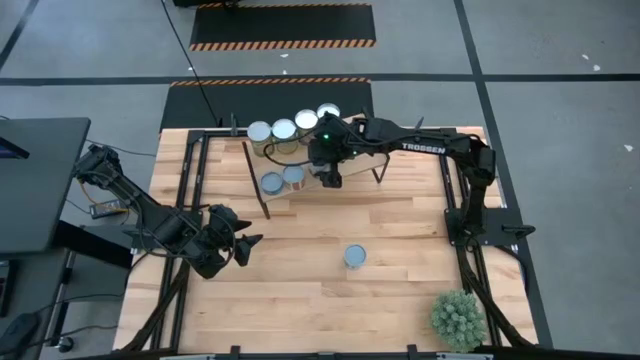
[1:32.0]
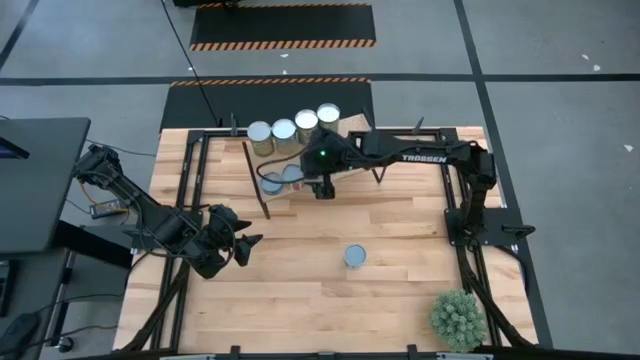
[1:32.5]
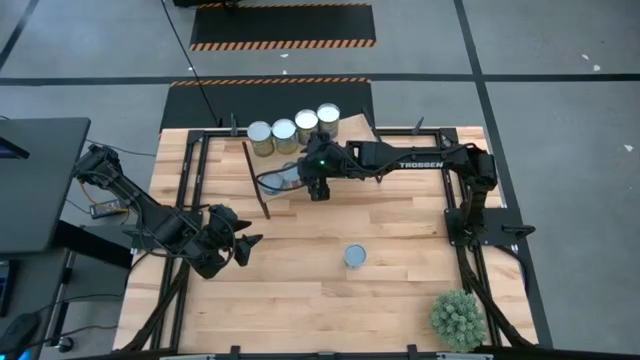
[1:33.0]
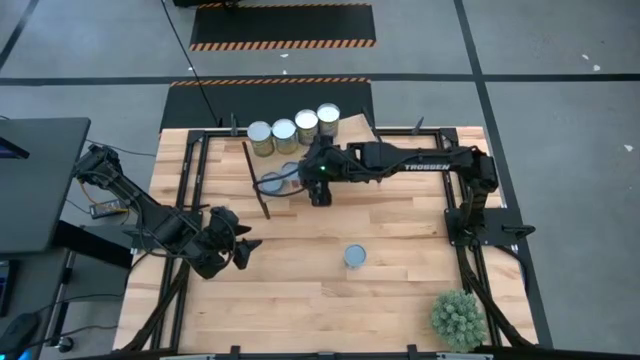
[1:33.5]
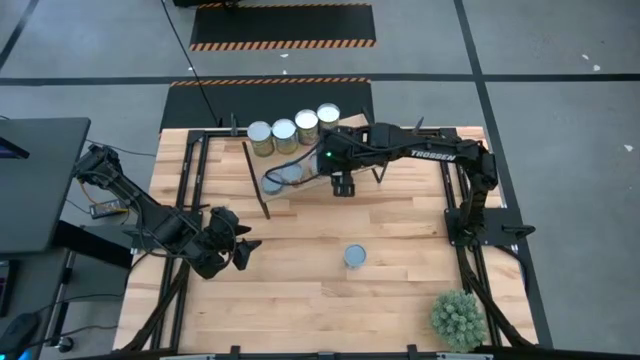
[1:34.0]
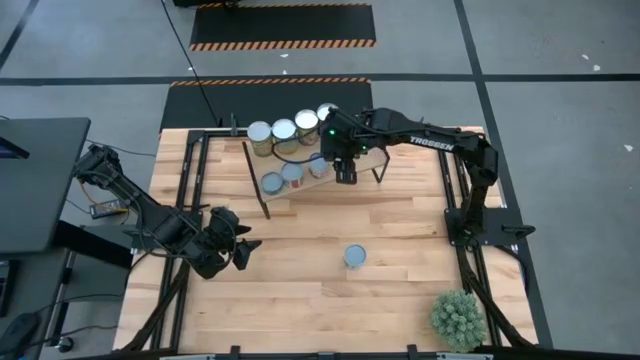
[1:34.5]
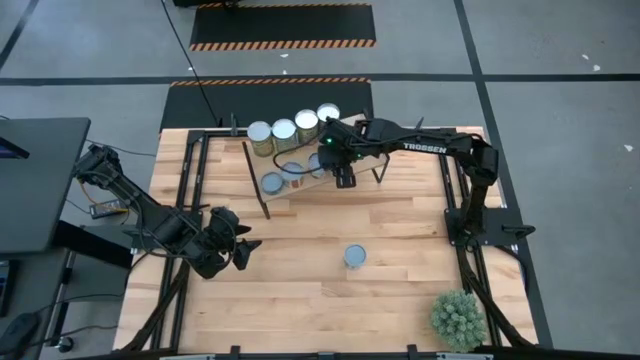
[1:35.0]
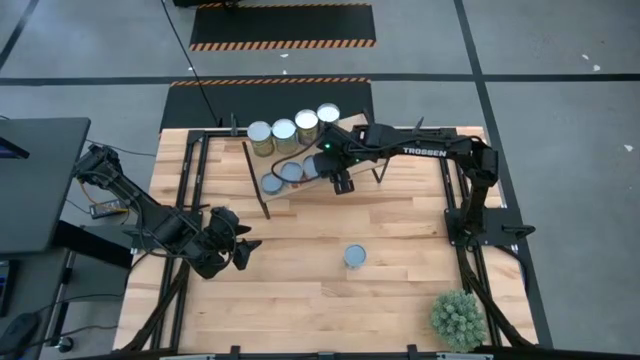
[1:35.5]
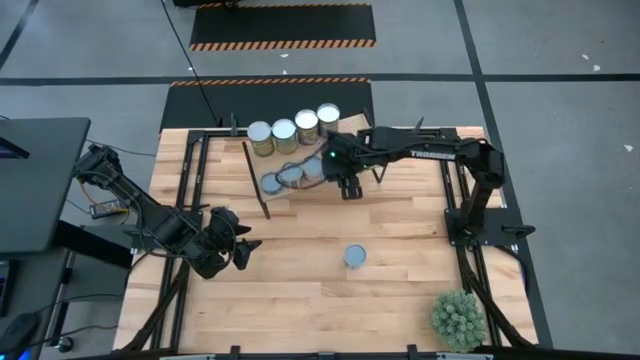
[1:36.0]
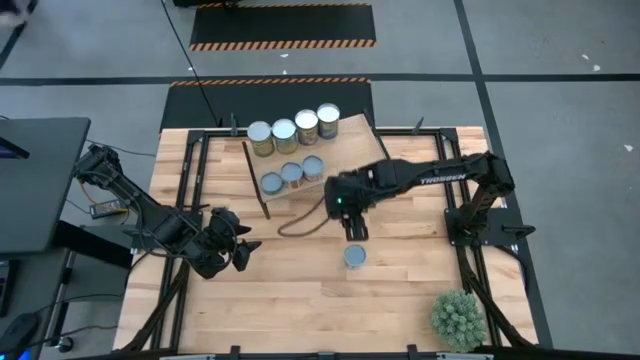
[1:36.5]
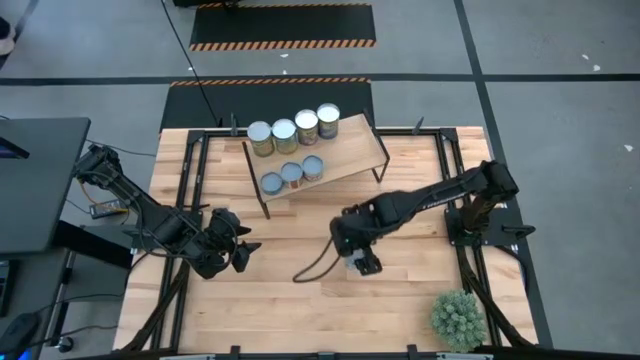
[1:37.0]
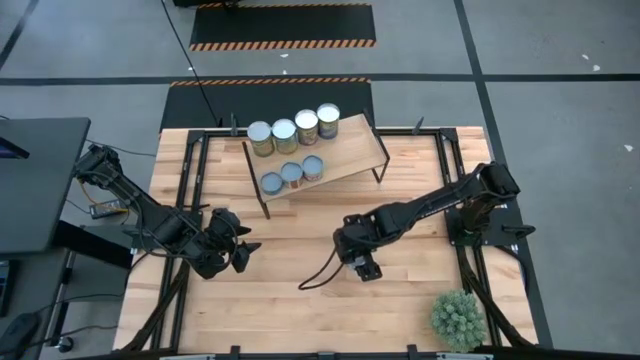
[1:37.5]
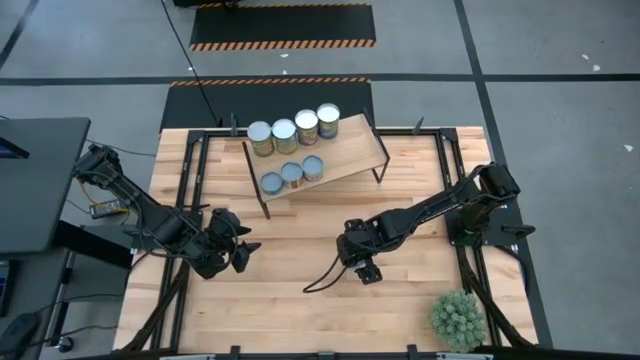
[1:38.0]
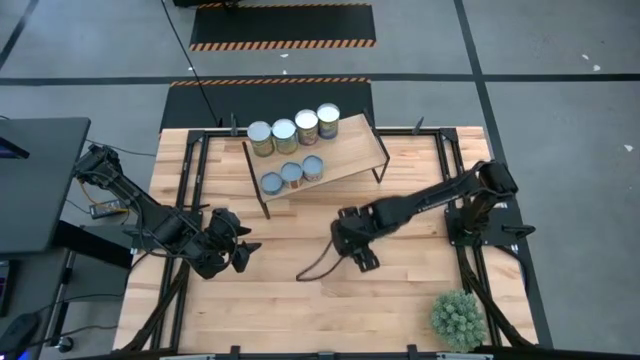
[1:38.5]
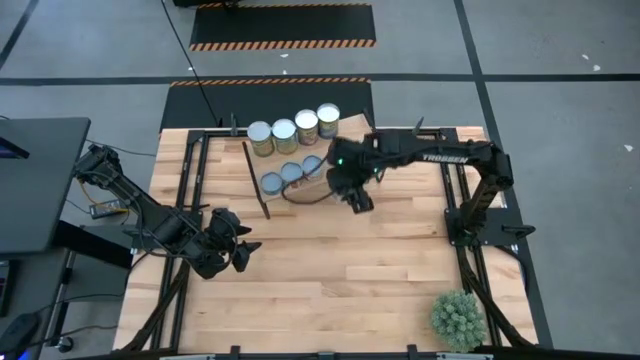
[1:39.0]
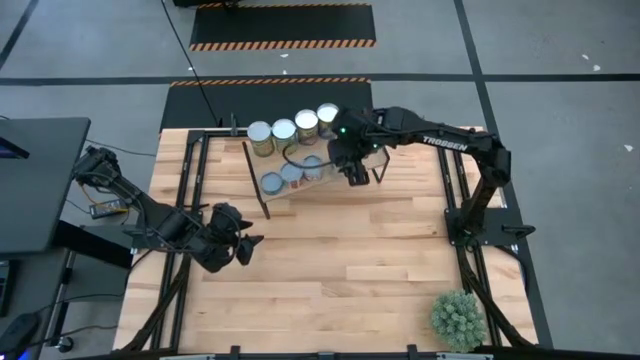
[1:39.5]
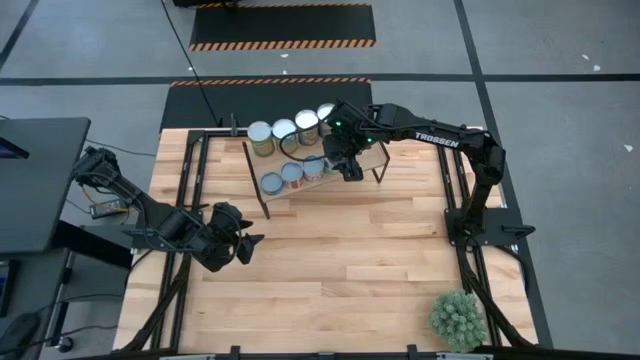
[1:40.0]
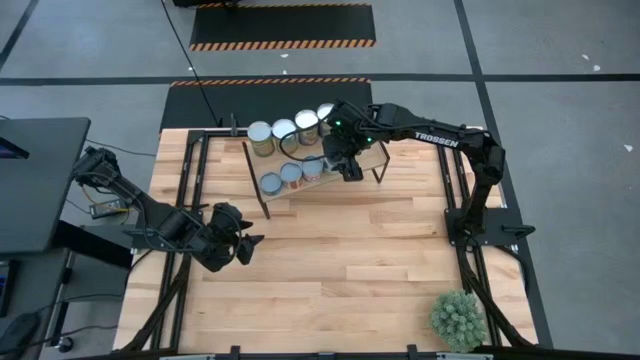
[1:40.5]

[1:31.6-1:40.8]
Task: Pick and place cans onto a shelf
Put the mixed vegetables can on the shelf

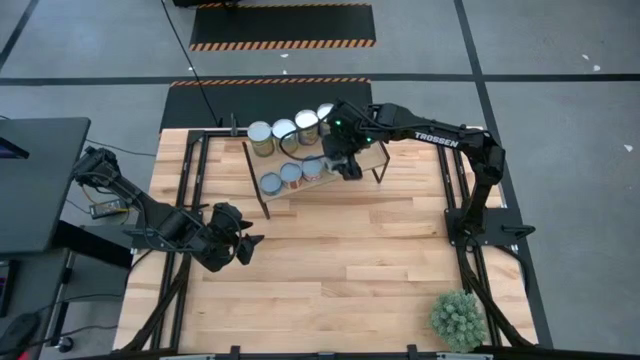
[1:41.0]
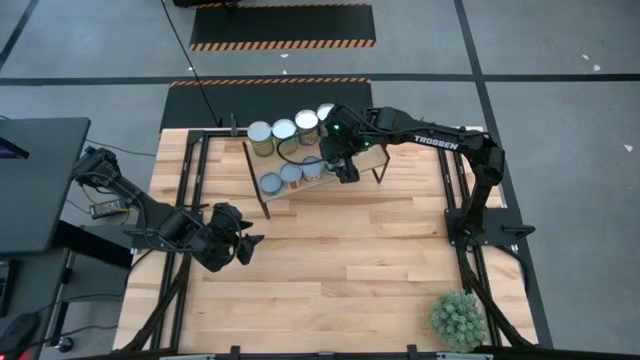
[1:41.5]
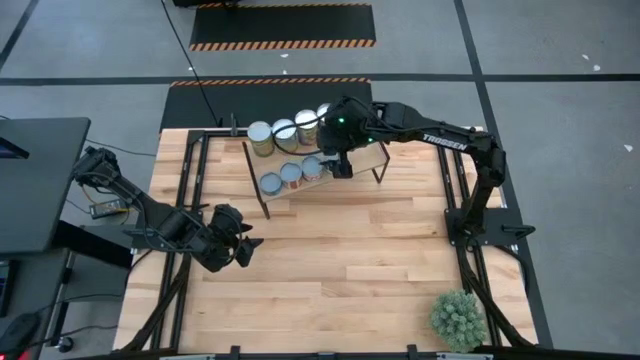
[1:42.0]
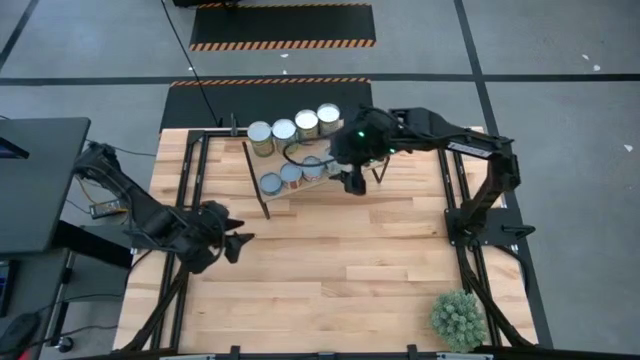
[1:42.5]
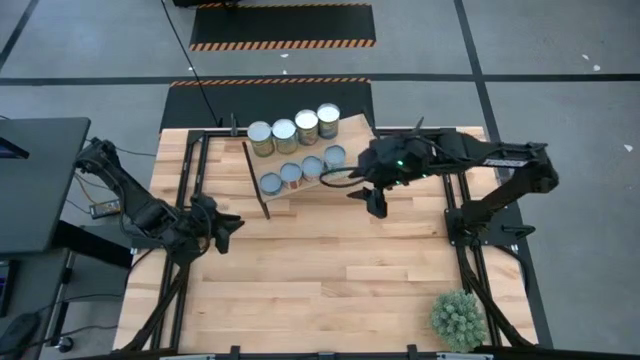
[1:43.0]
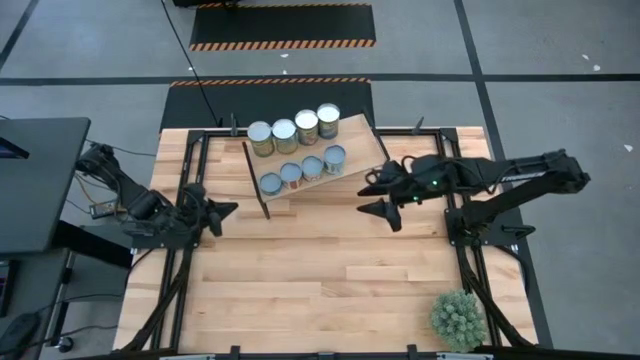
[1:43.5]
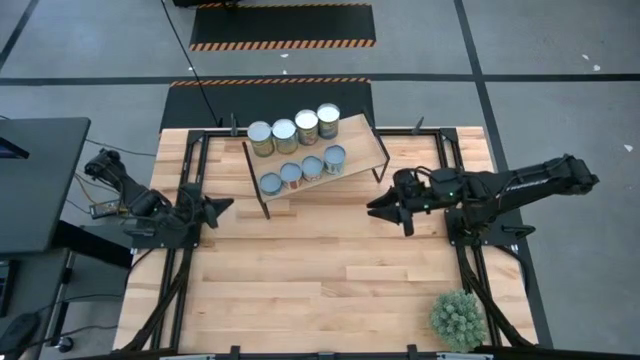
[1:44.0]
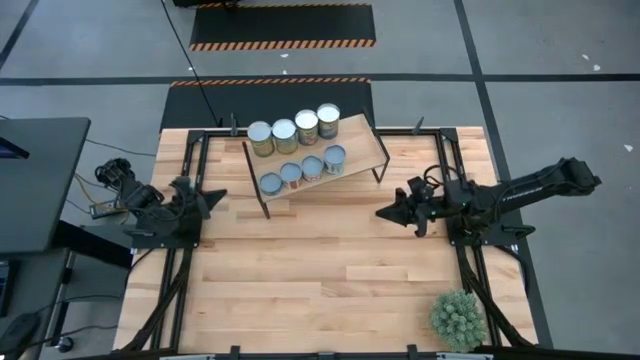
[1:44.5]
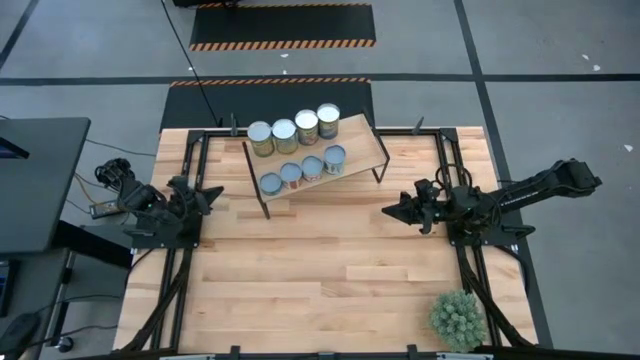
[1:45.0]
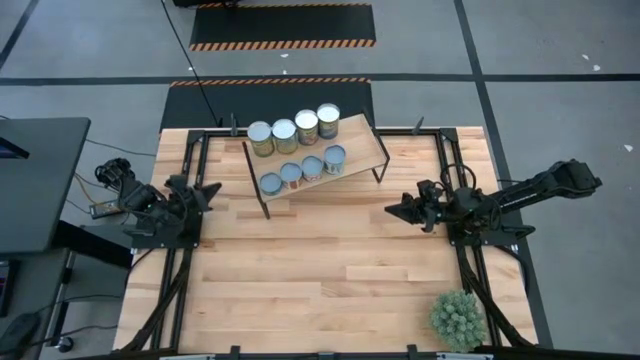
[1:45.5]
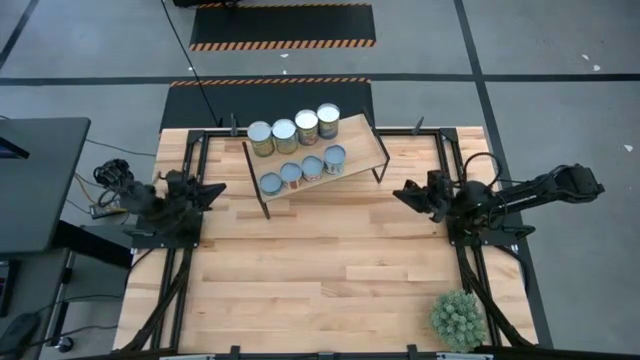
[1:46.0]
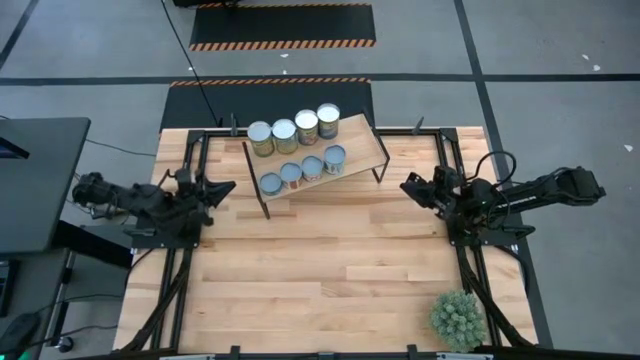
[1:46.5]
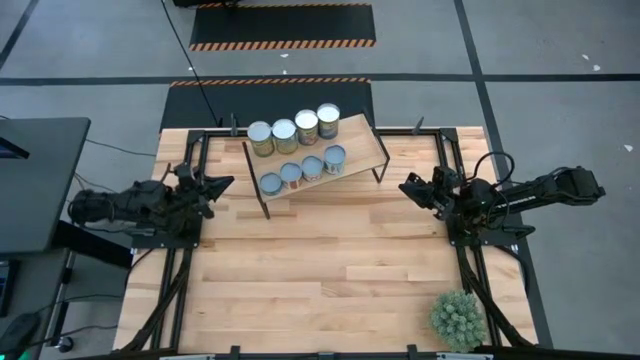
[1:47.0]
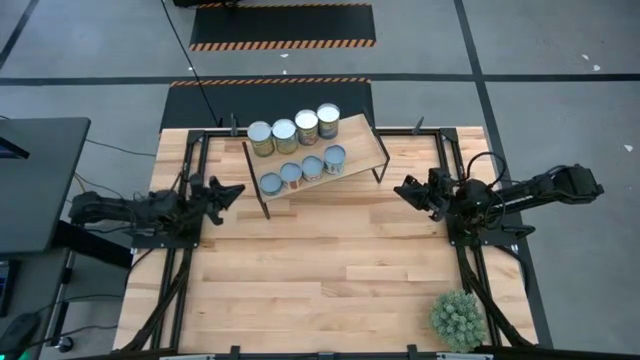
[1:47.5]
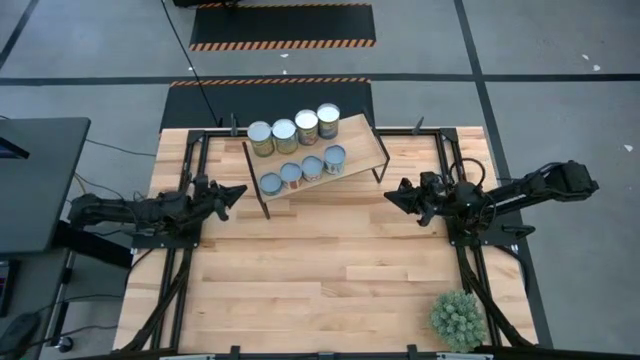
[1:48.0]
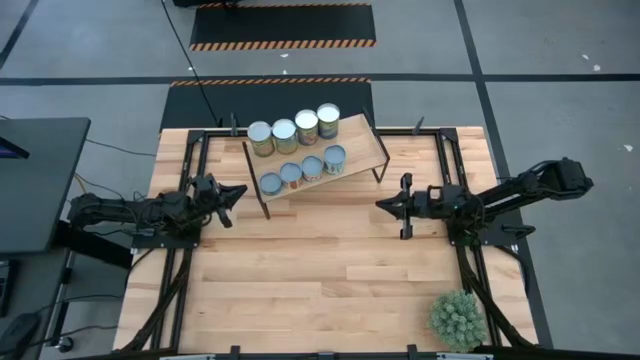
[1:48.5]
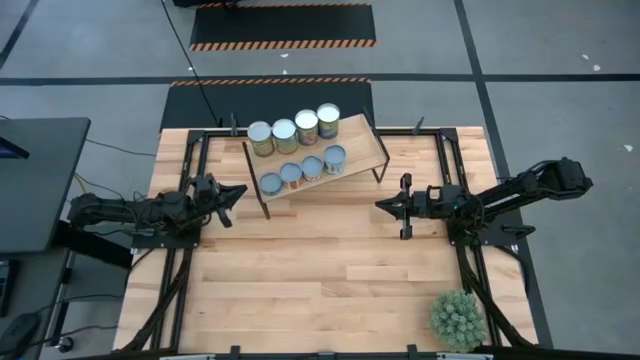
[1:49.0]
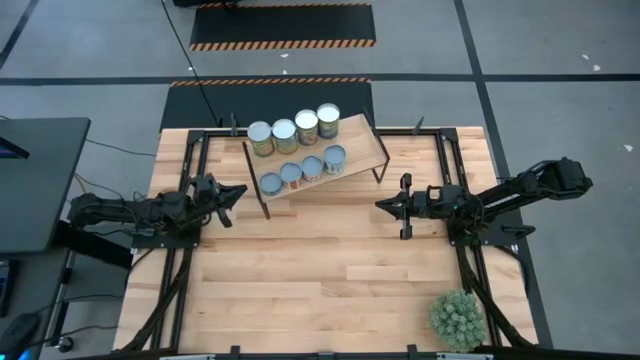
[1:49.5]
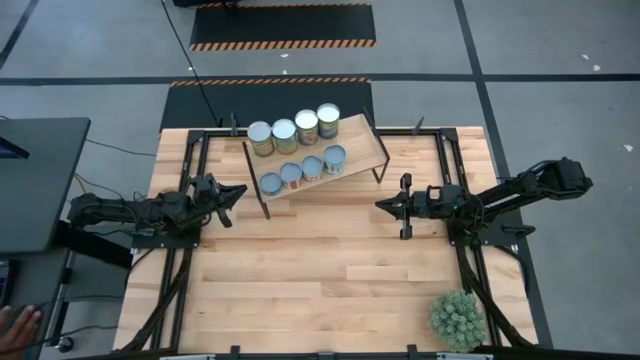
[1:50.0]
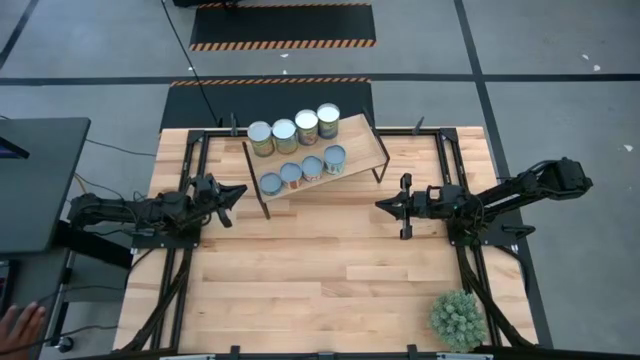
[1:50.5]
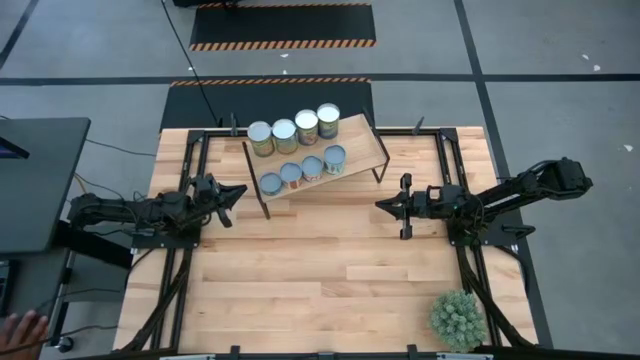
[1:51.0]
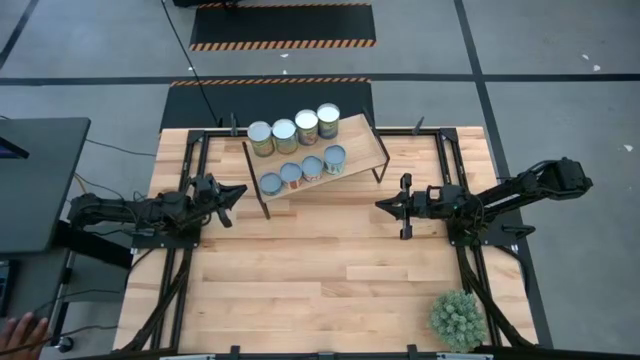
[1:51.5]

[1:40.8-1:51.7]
Return to Home Position

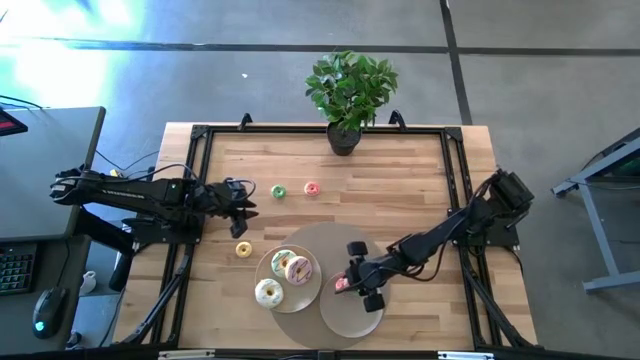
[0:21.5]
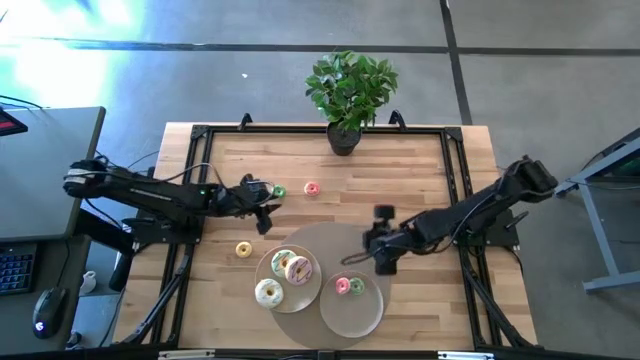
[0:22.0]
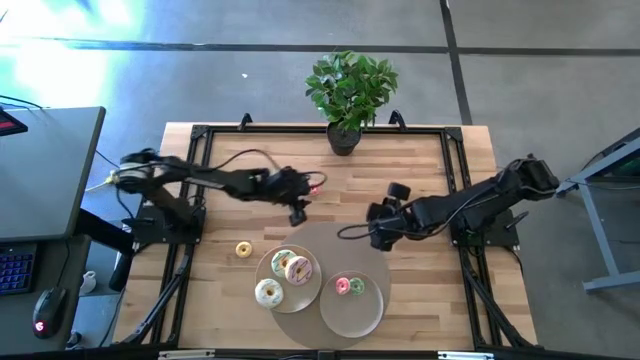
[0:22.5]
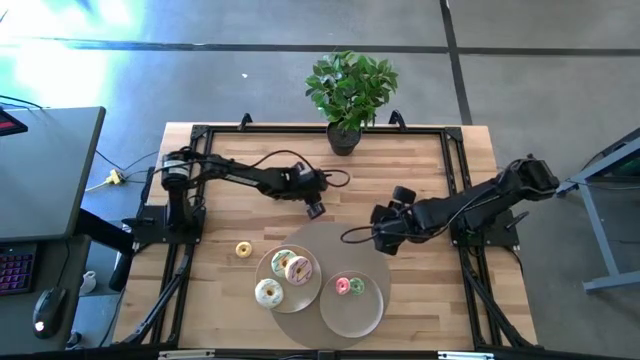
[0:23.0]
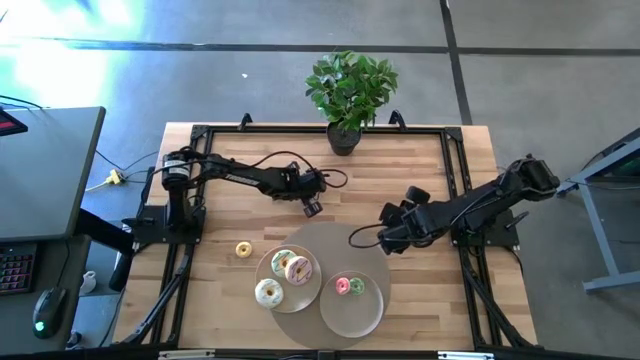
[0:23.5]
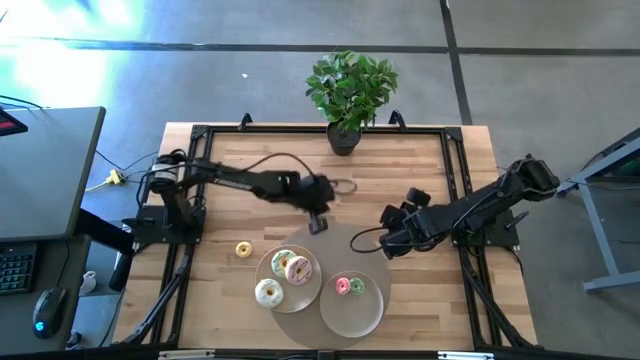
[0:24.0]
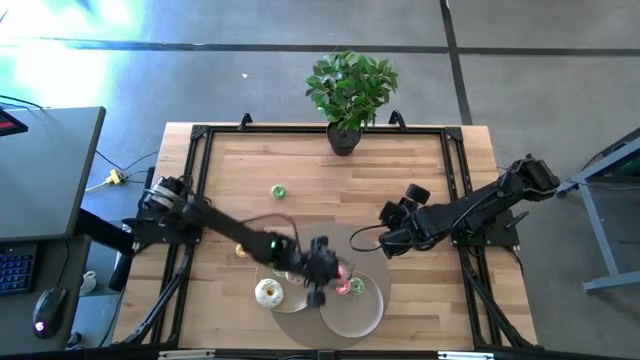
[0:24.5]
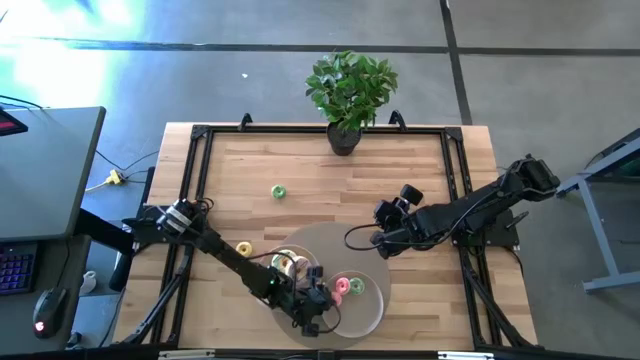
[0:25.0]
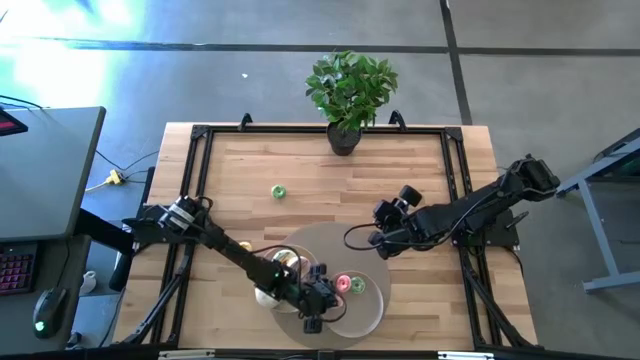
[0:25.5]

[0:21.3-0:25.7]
Task: Pick & Place donuts
Put the small pink donut on the right white plate
